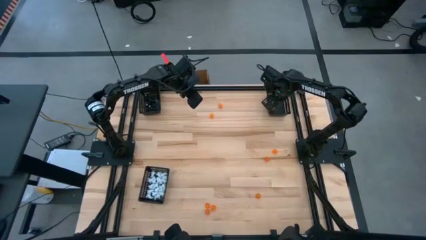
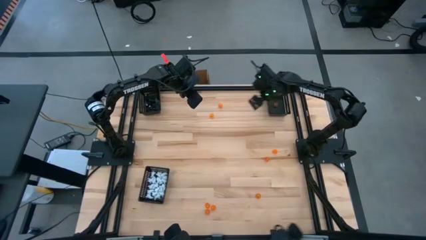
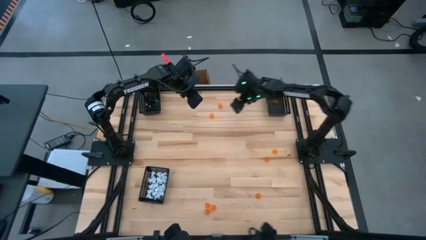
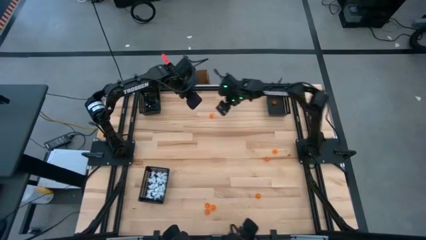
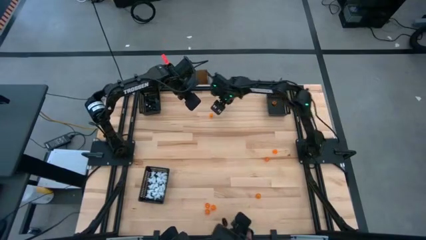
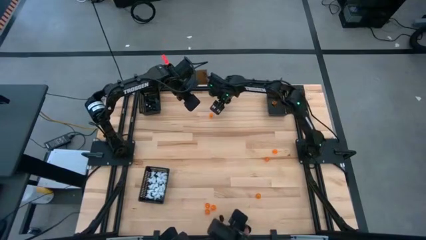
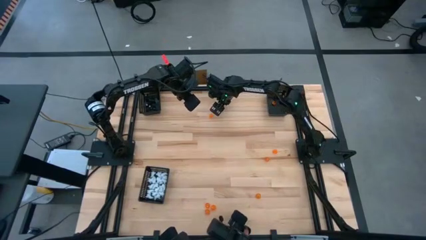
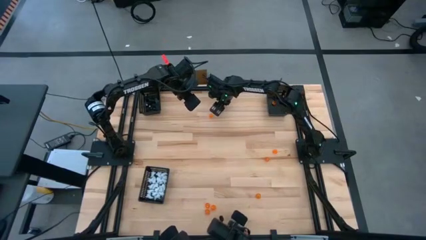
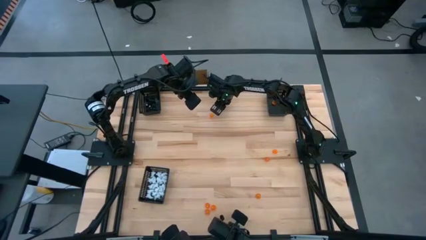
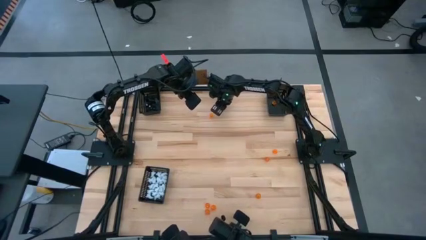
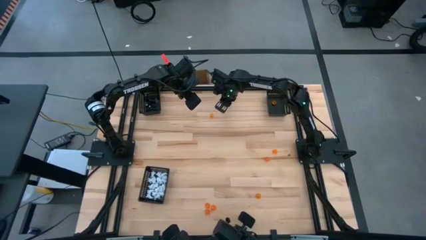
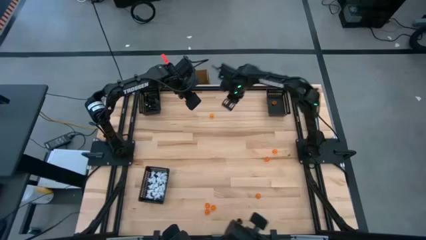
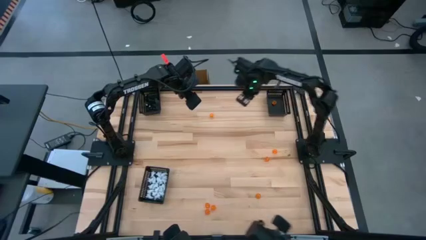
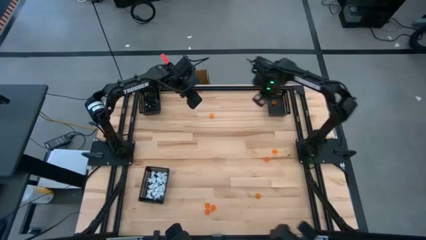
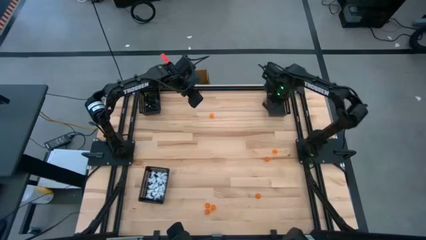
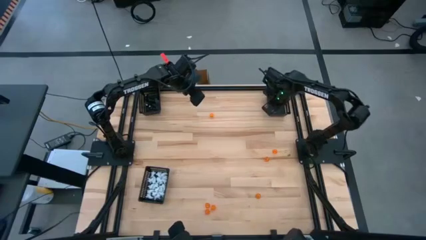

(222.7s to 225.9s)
Task: Sort Halloween decoration
Put the orange pumpkin toy into the top right black basket

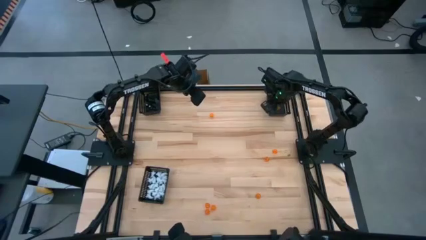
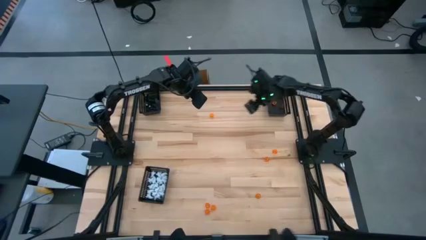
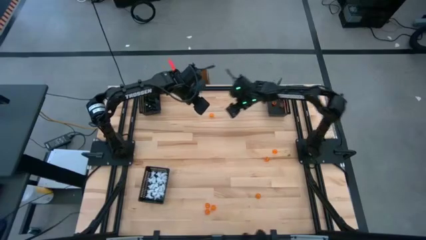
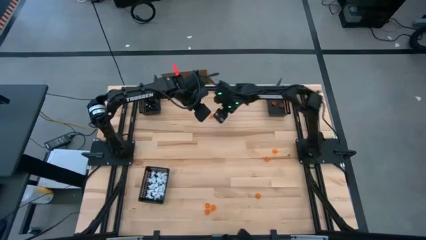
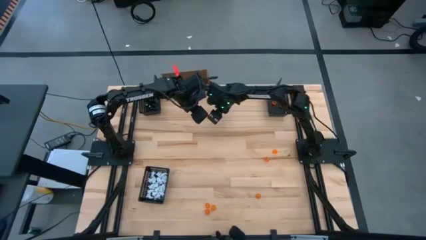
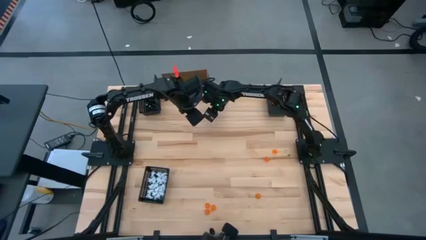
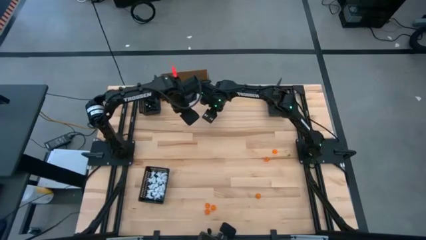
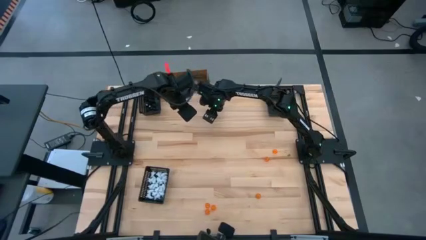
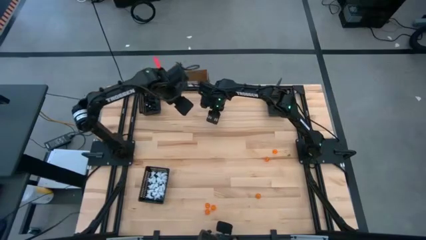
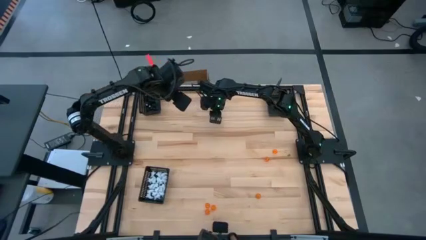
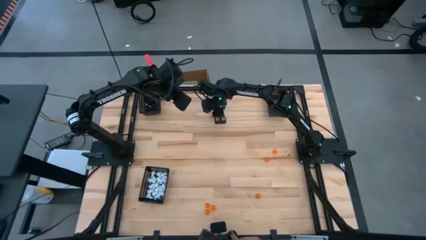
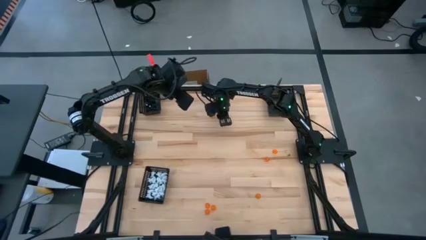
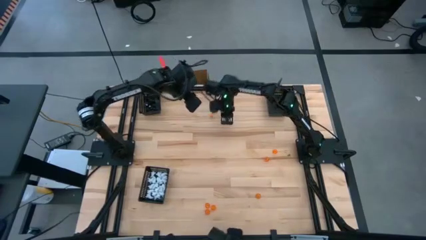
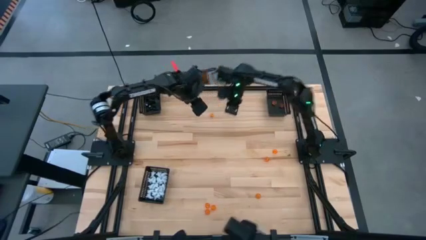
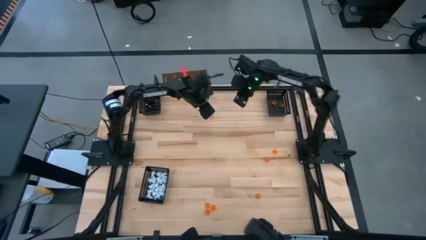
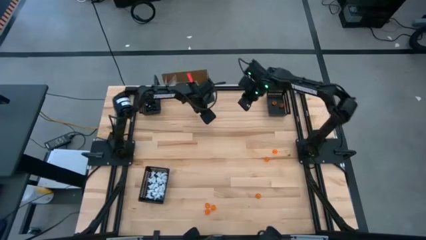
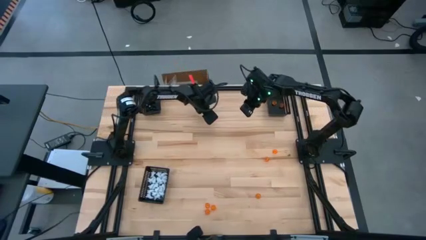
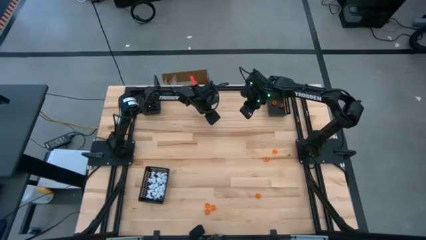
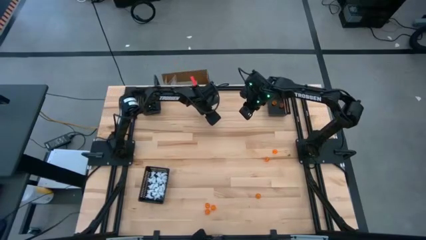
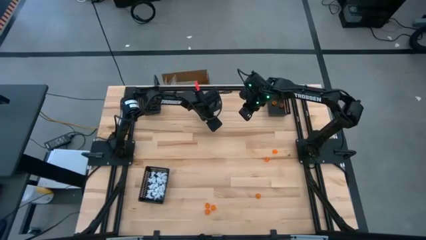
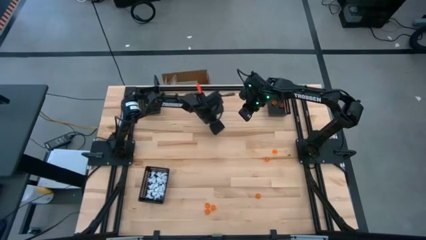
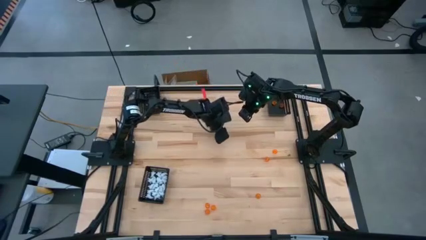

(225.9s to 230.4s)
Put the orange pumpkin toy into the top right black basket

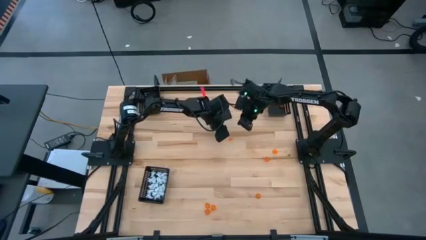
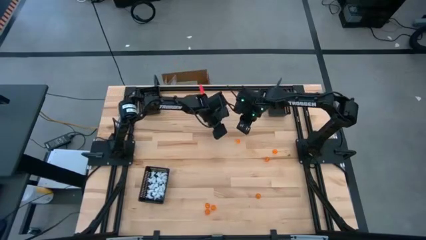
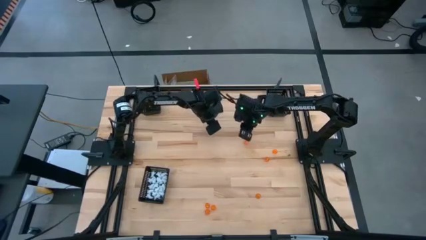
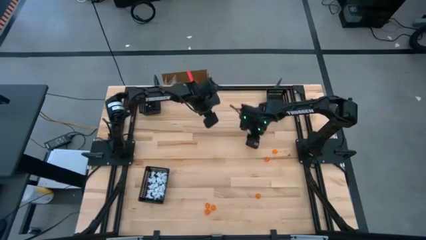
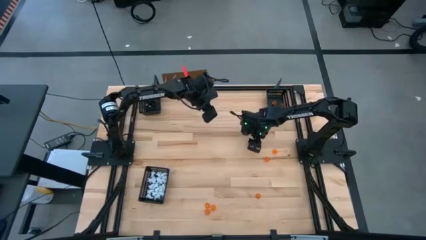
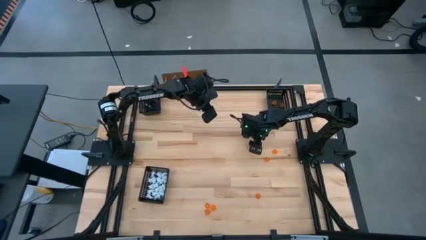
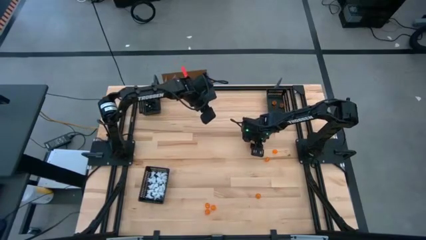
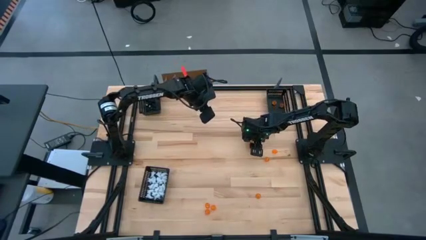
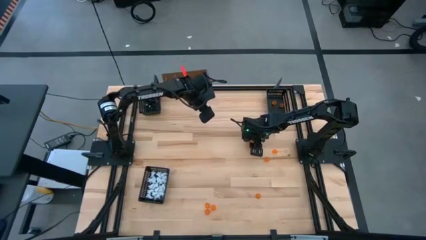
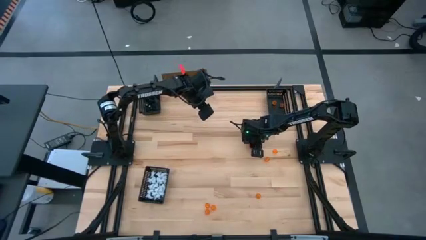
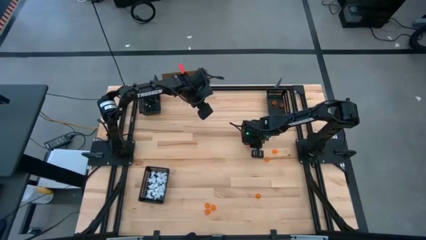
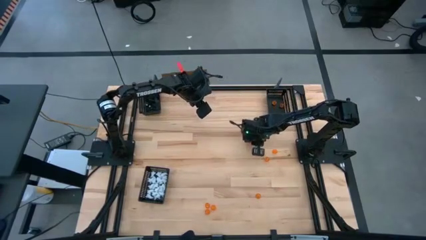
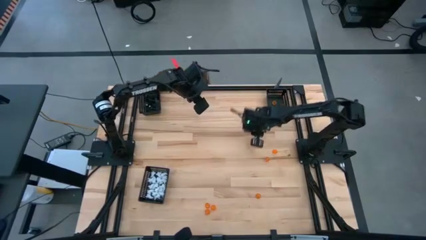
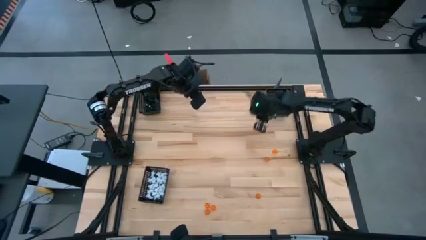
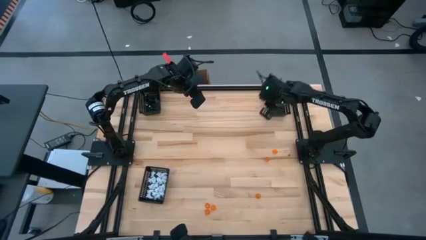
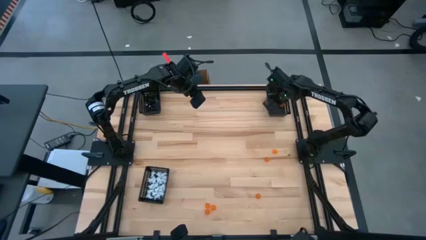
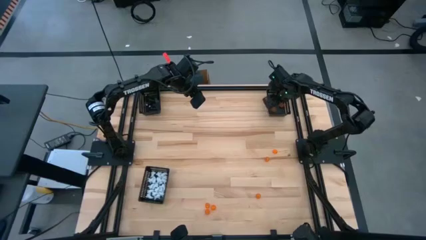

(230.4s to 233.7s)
Put the orange pumpkin toy into the top right black basket

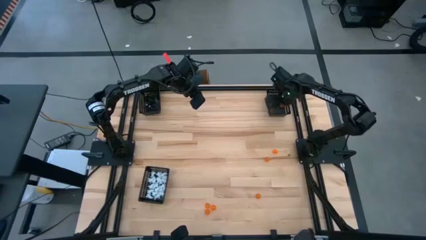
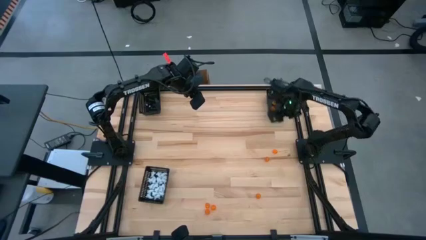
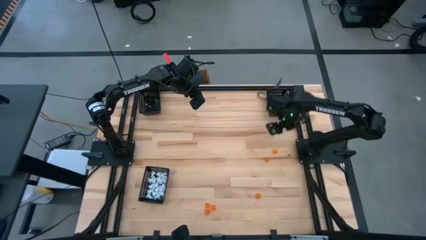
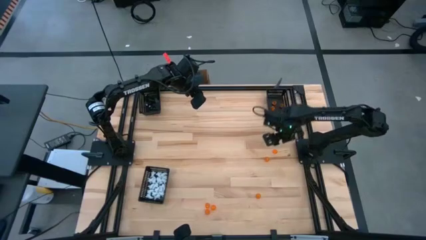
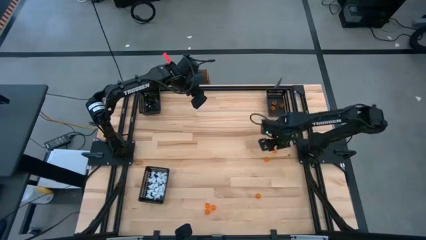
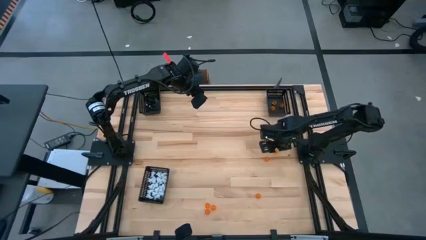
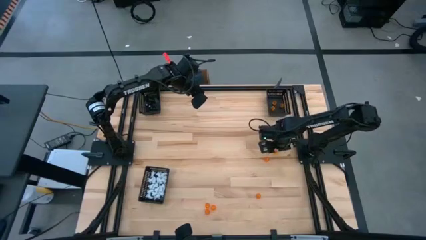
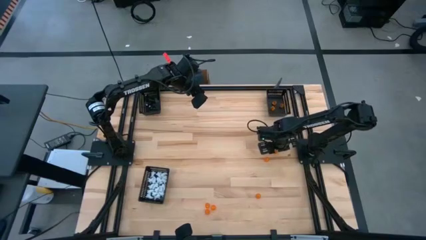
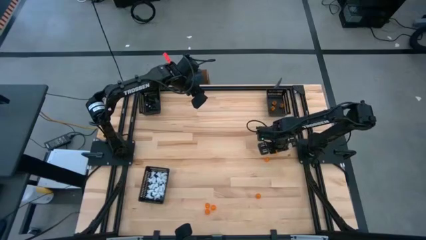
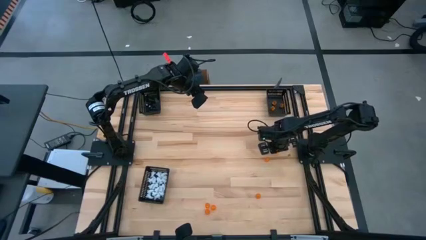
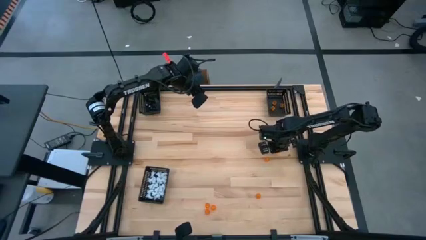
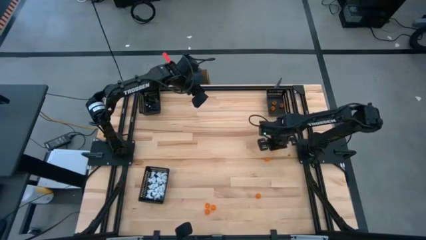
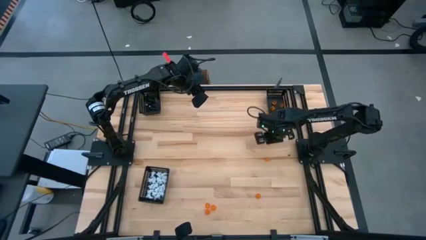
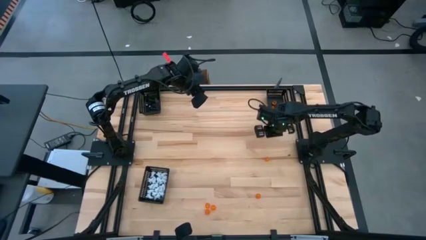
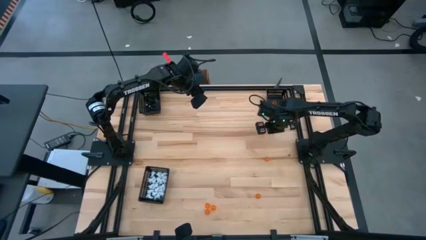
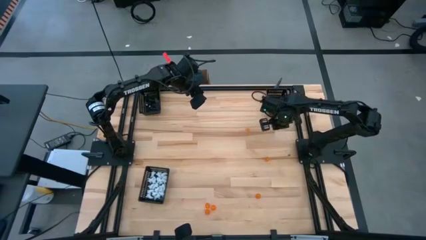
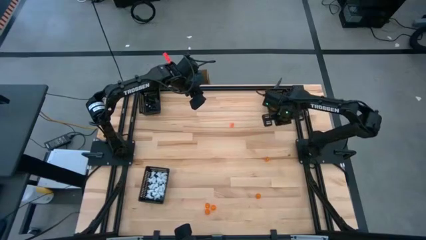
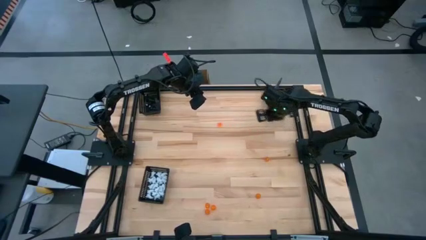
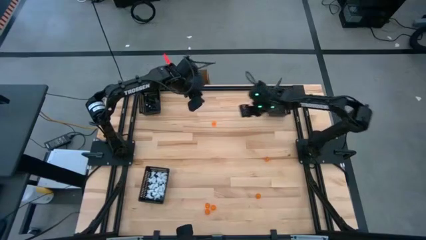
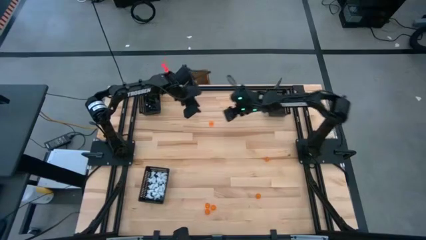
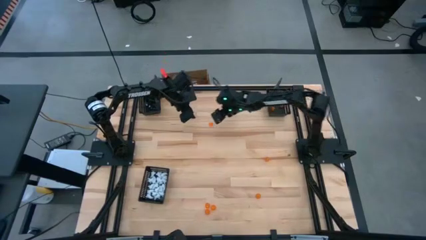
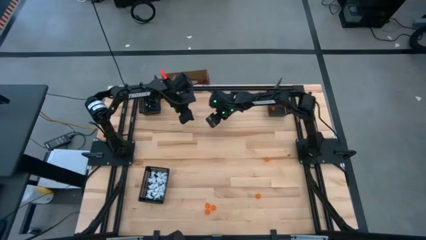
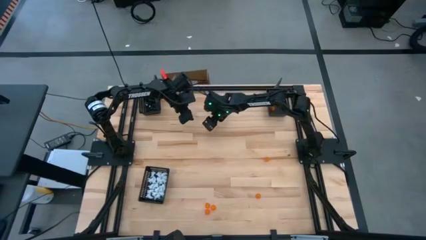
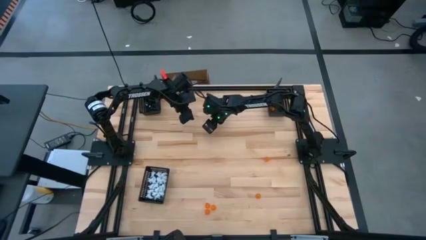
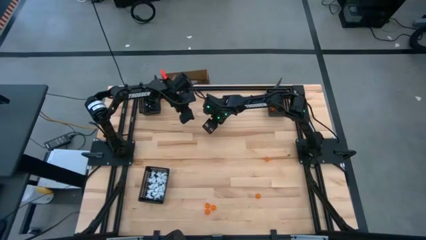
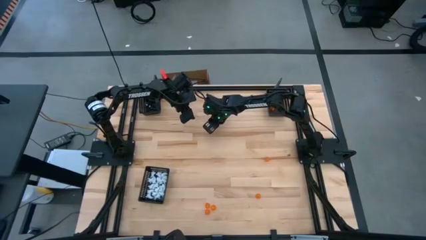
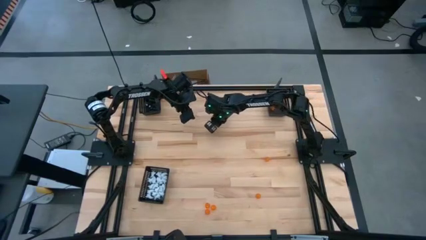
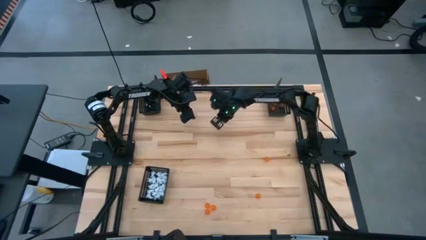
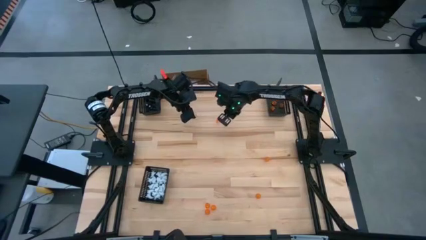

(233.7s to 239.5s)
Put the orange pumpkin toy into the top right black basket

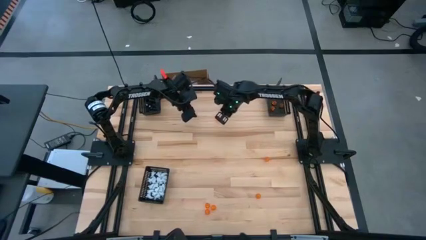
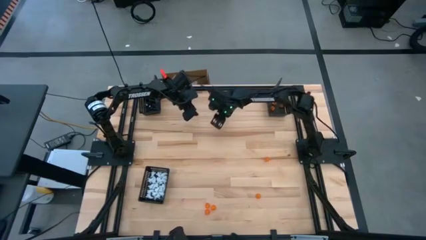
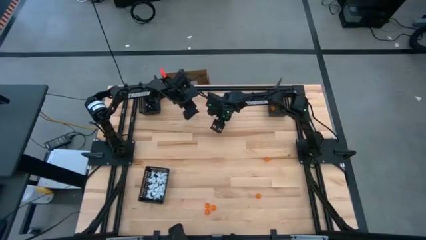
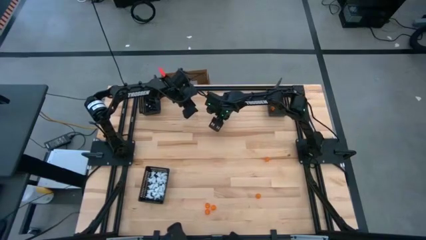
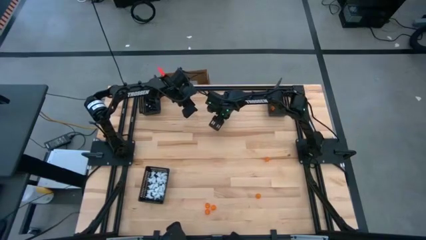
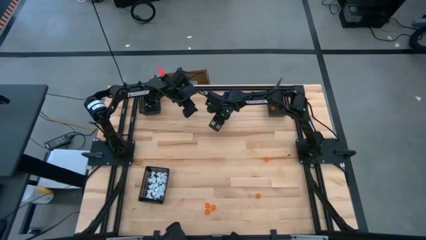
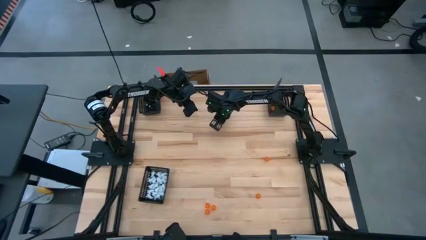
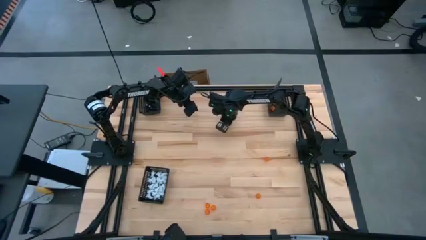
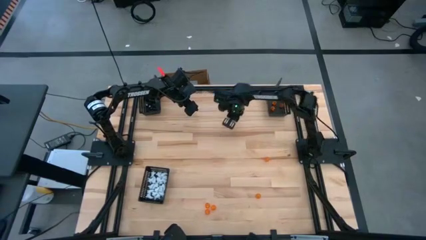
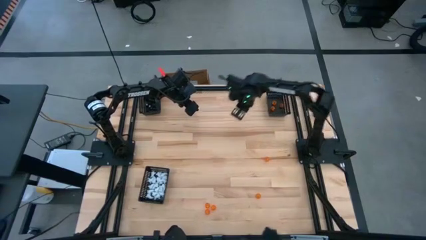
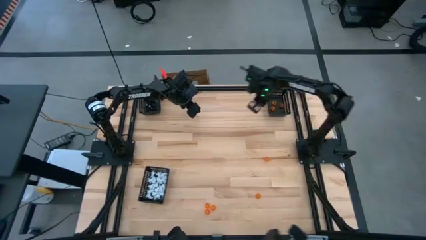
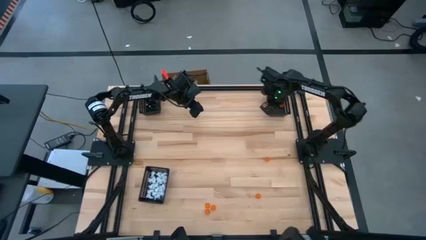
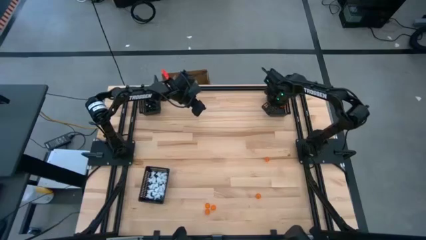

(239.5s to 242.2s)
Put the orange pumpkin toy into the top right black basket
